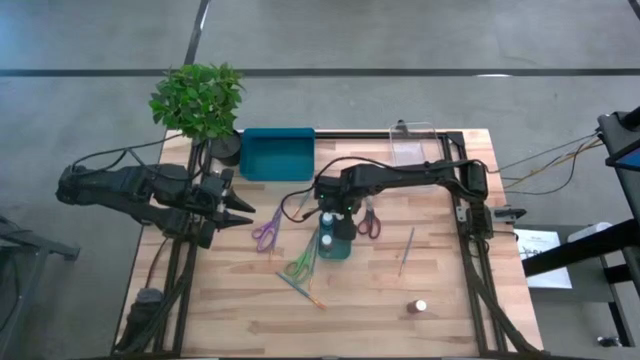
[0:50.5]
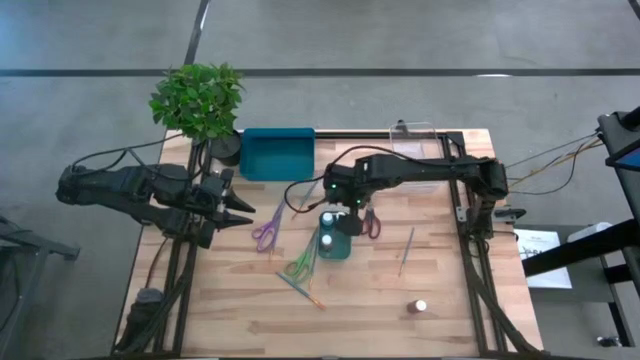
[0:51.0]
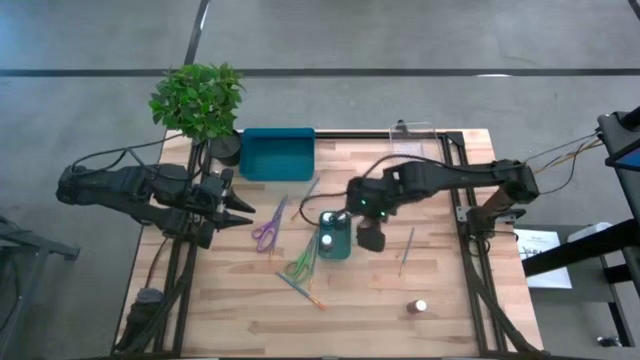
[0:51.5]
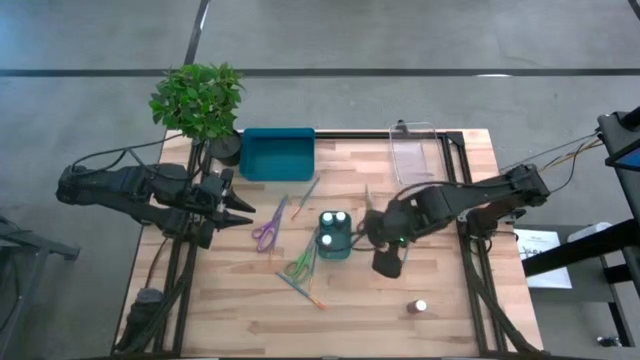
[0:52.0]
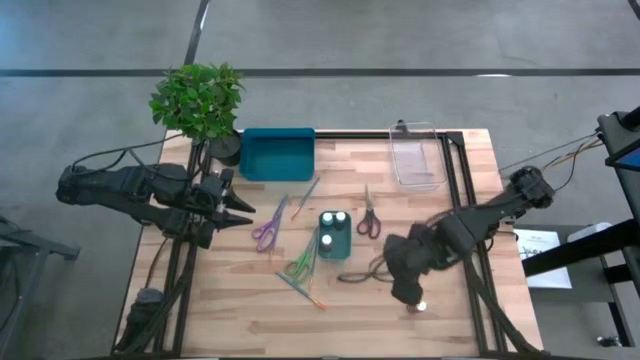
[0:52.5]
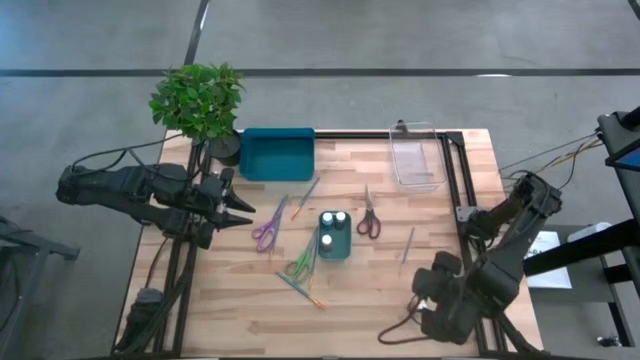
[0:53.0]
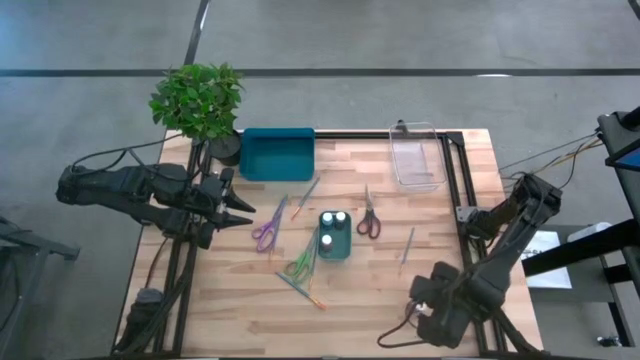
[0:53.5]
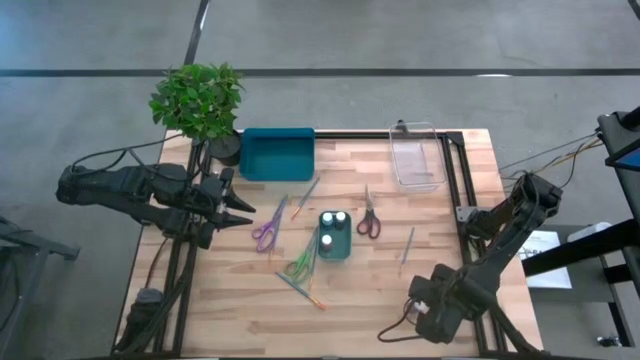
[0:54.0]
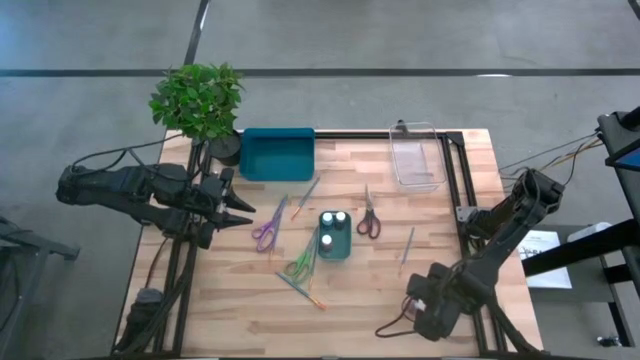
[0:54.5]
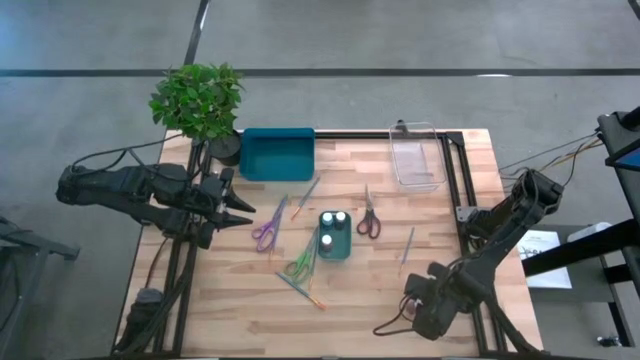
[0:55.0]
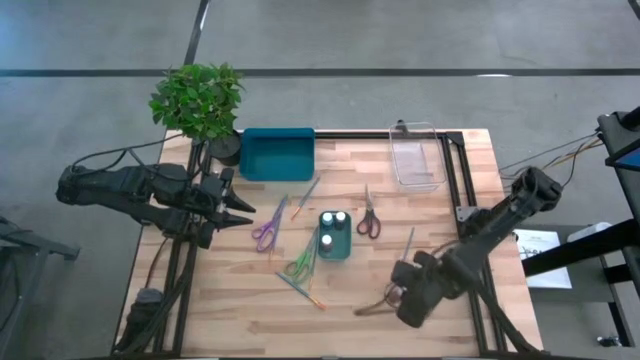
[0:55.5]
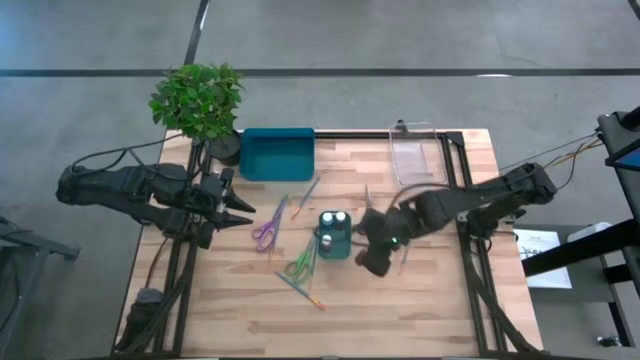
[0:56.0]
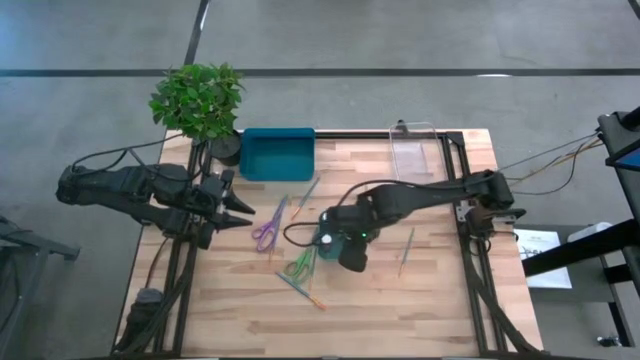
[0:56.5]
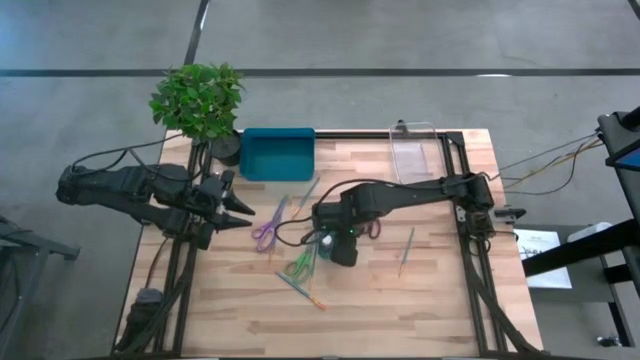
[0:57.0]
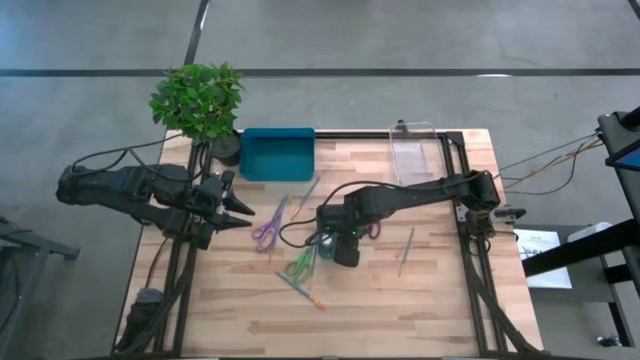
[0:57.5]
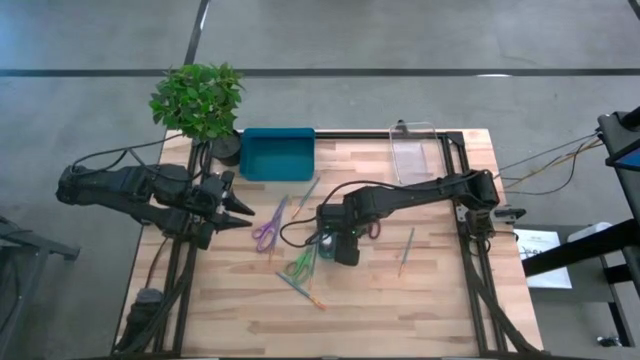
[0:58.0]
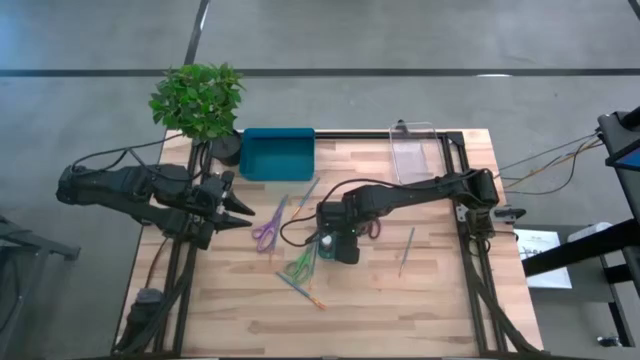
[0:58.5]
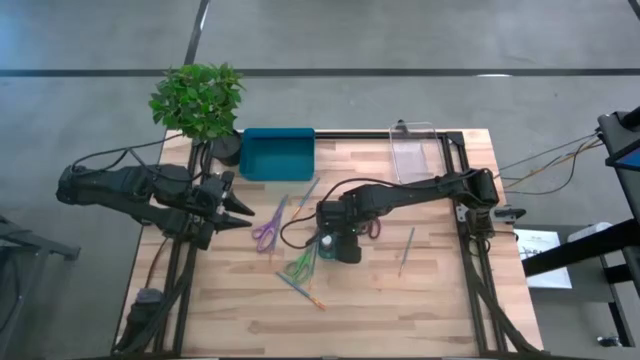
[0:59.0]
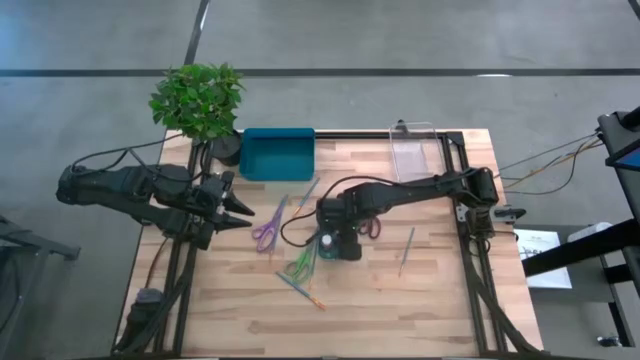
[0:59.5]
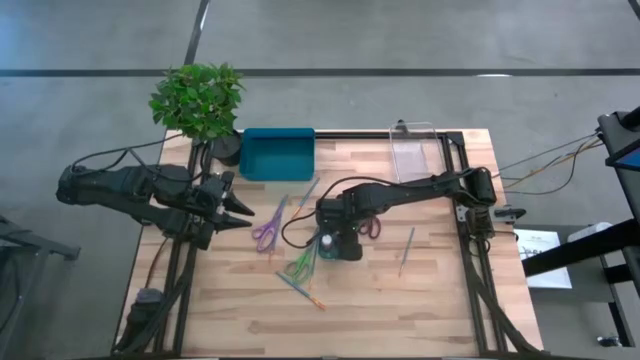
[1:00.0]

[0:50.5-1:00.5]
Task: Pick & Place Paint Supplies
Put the red paint bottle into the blue bin

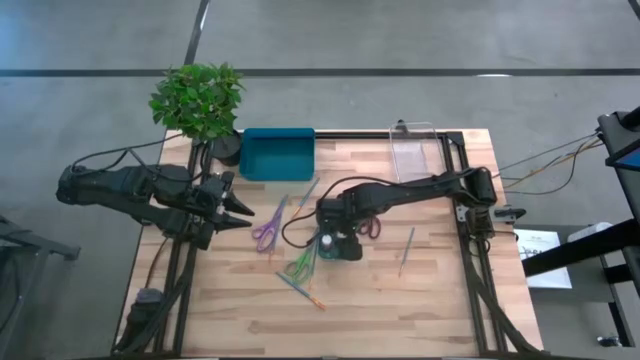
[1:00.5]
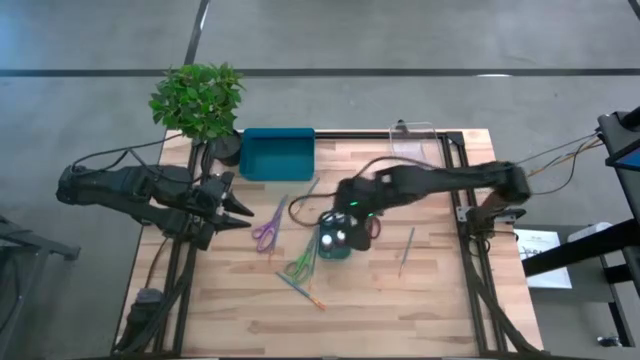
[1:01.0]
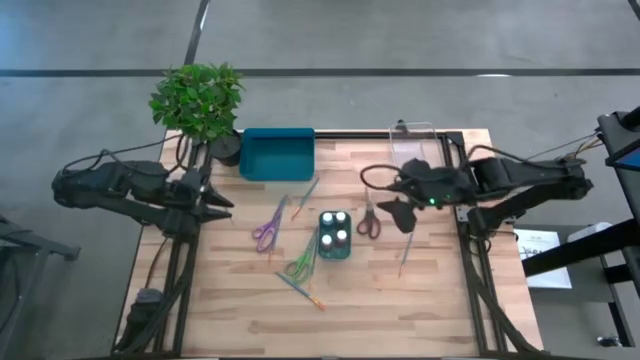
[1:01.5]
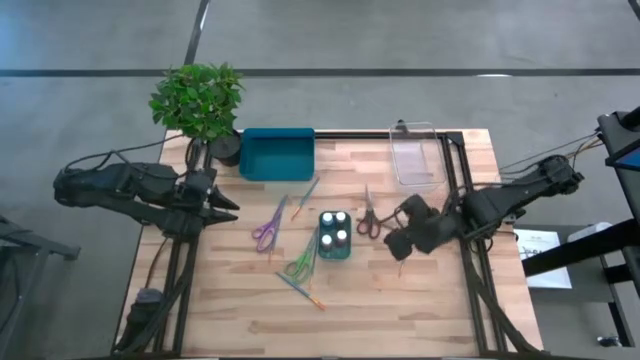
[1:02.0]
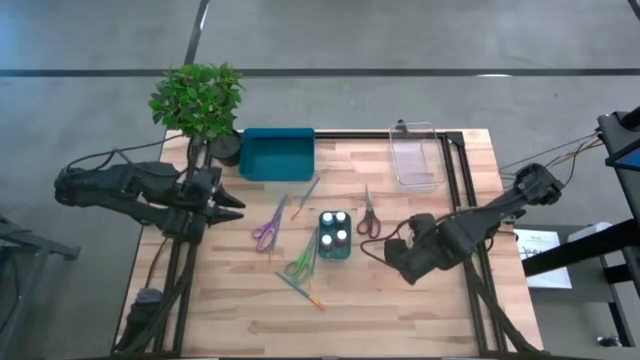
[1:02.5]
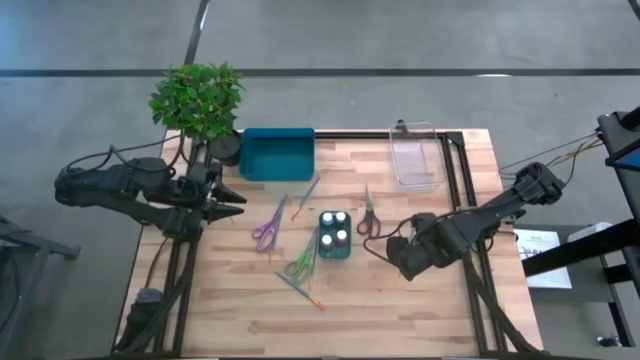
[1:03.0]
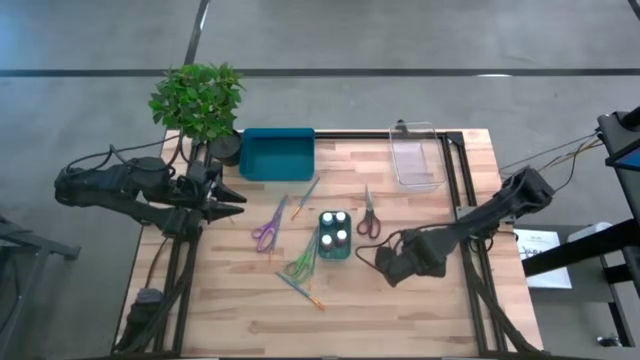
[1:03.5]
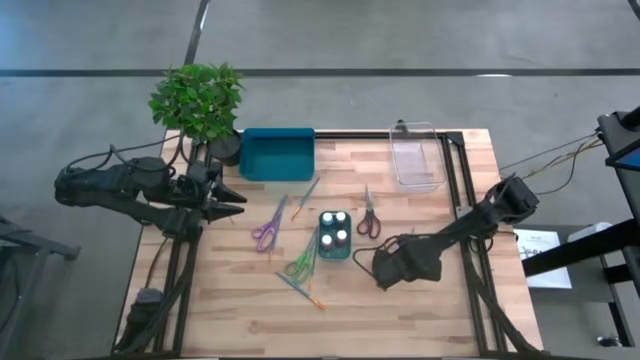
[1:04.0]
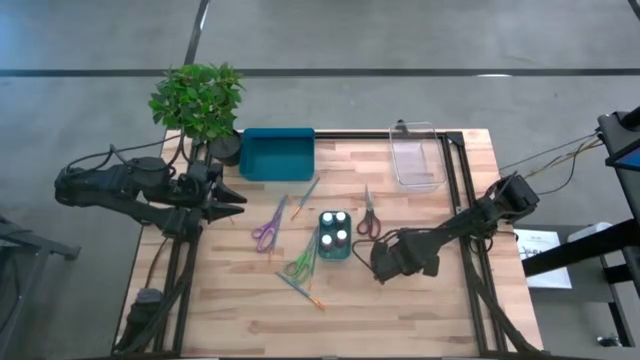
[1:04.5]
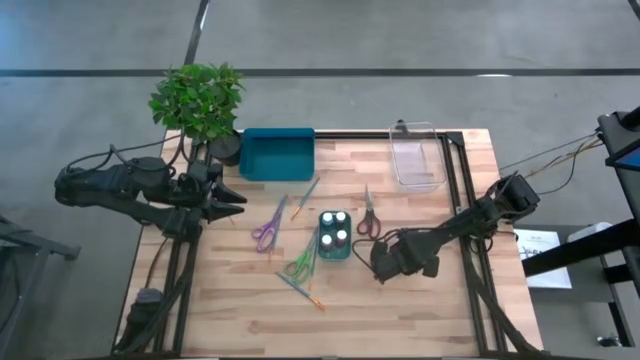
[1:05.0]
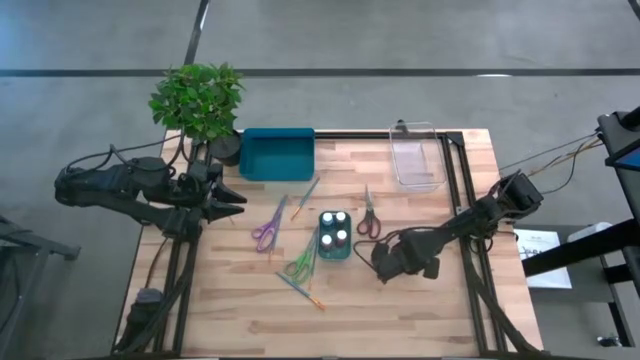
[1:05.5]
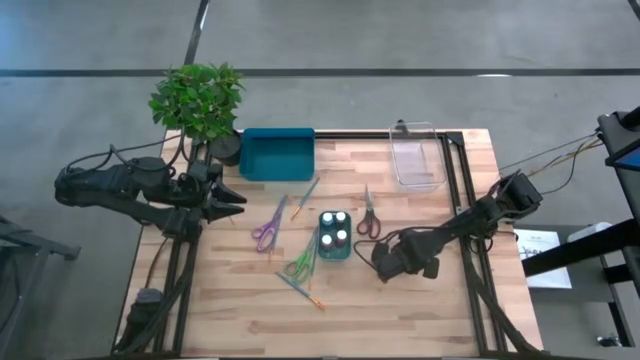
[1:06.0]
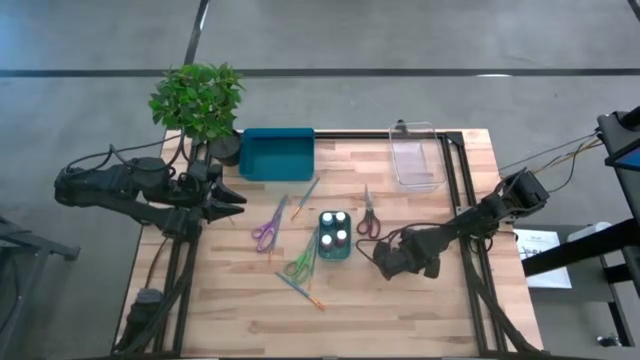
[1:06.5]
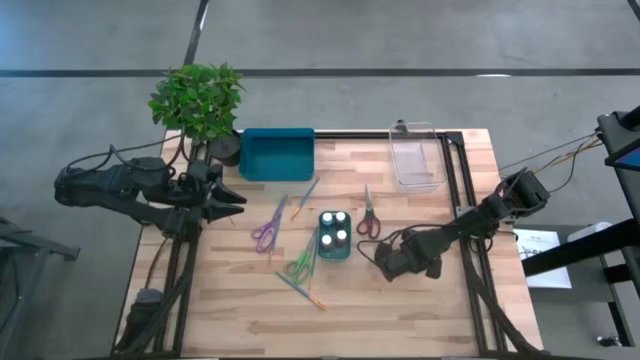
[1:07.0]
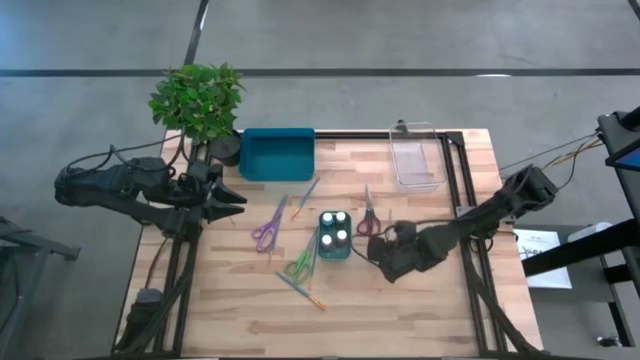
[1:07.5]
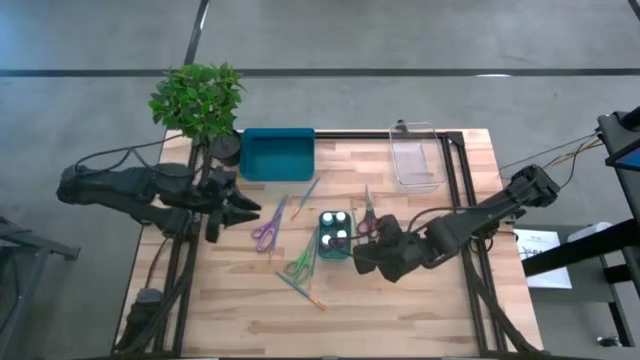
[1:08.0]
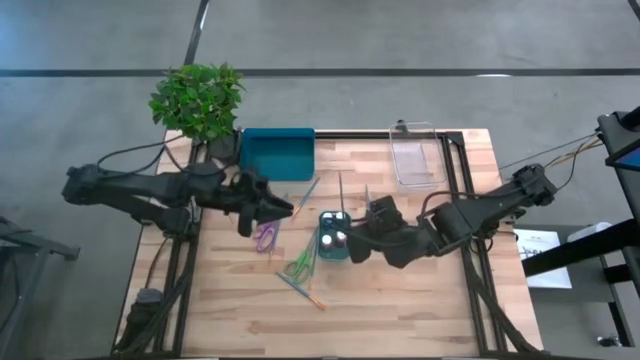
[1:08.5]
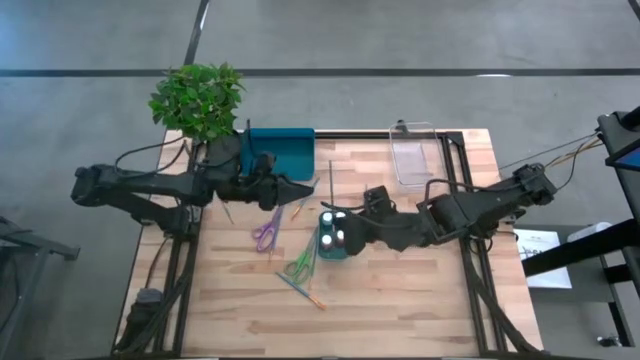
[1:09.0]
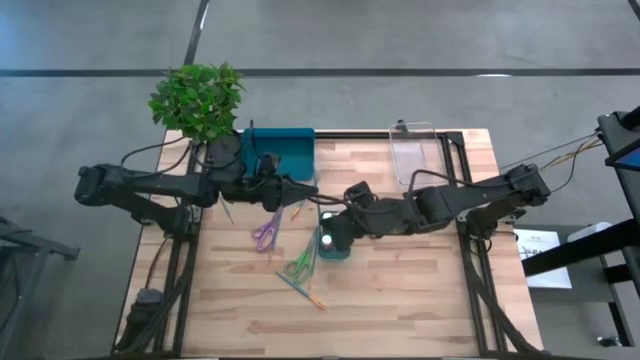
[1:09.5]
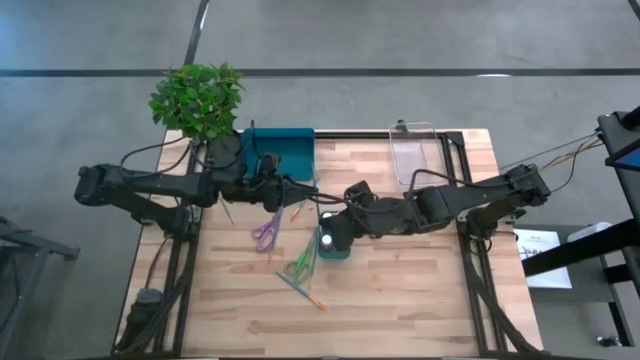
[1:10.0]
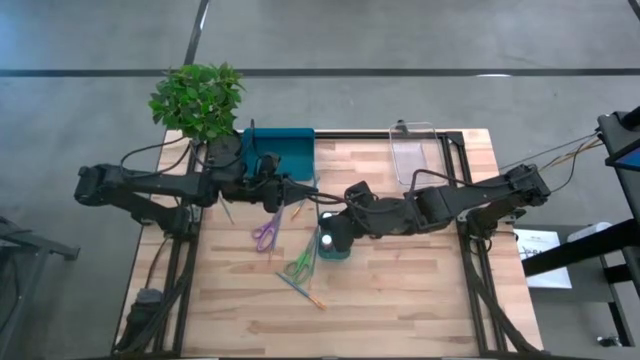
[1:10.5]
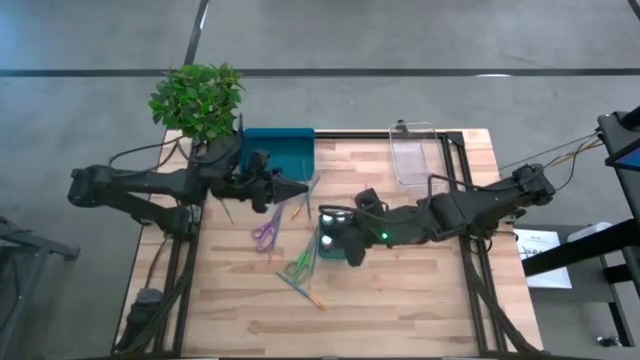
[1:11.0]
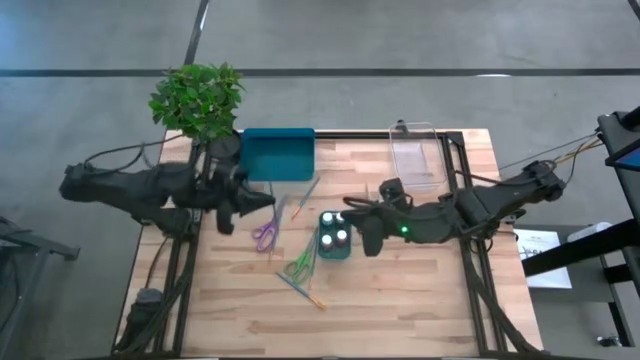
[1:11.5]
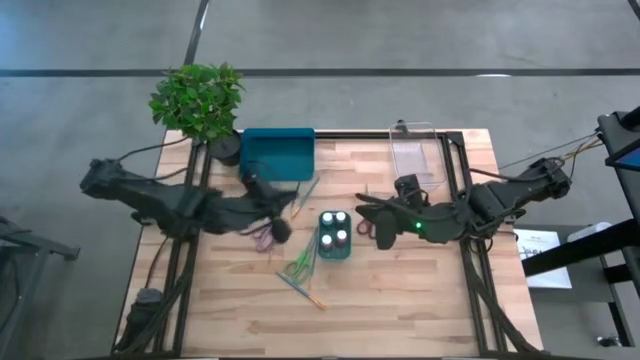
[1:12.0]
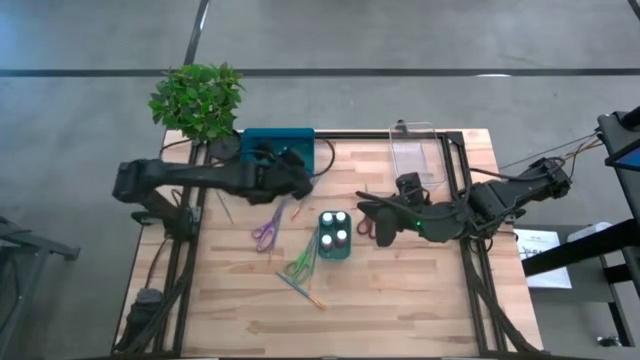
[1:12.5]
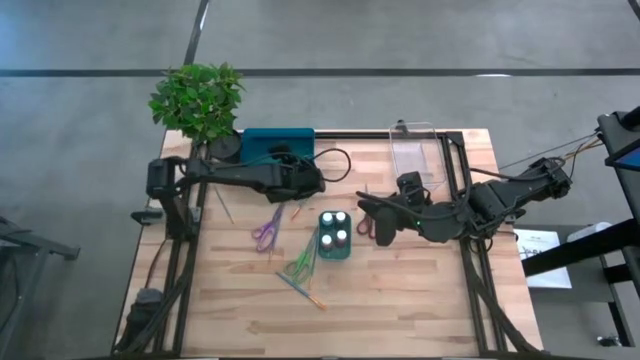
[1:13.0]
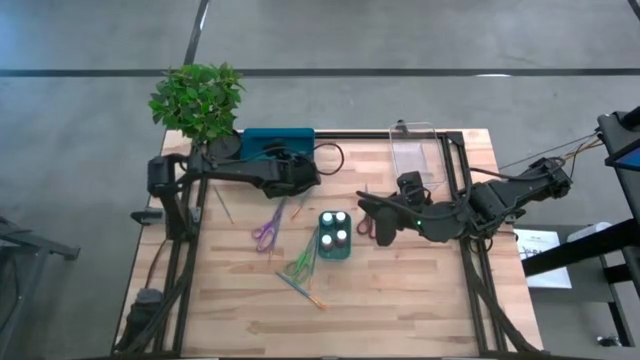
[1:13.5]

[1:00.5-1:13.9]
Put the right small blue paint brush into the blue bin
